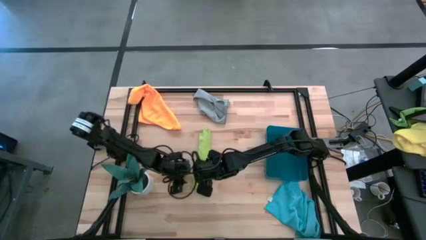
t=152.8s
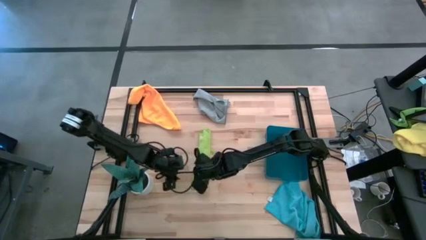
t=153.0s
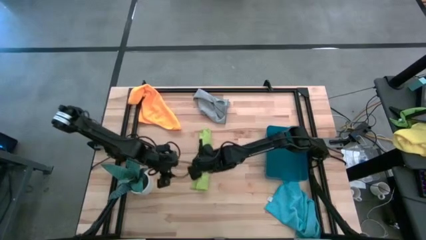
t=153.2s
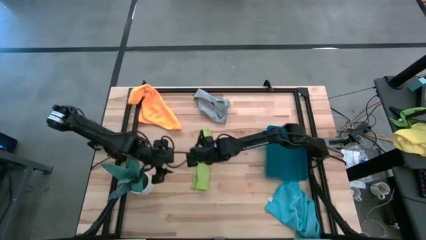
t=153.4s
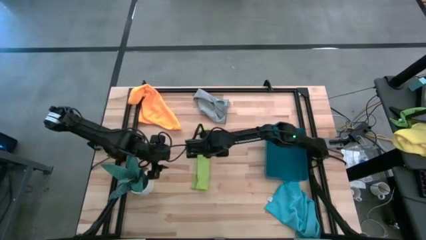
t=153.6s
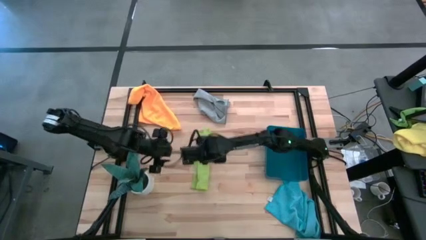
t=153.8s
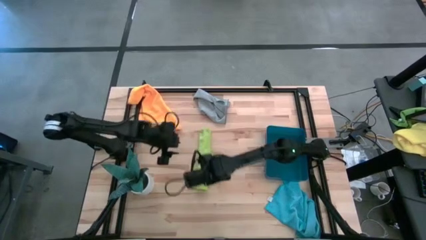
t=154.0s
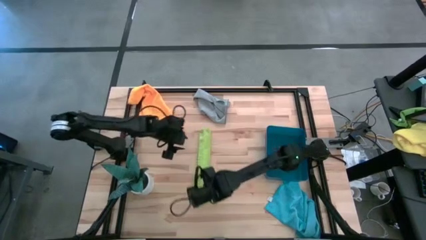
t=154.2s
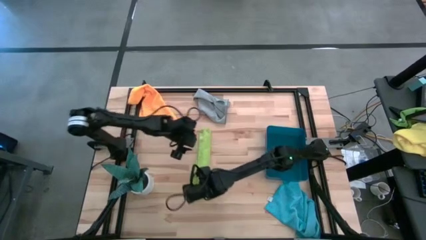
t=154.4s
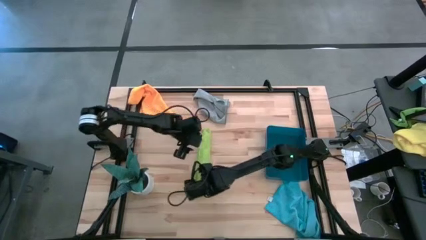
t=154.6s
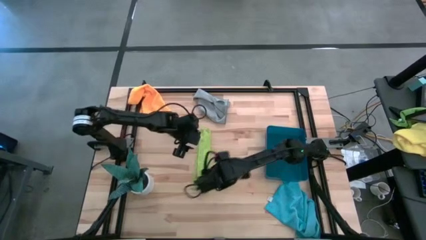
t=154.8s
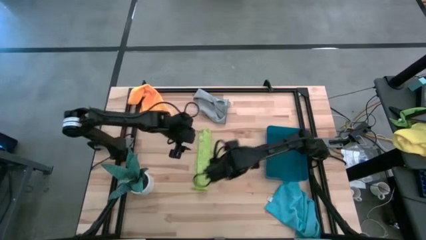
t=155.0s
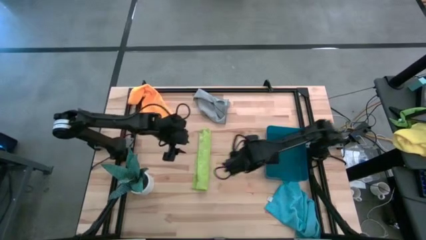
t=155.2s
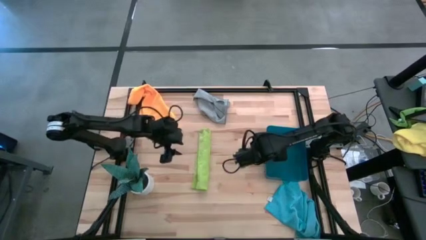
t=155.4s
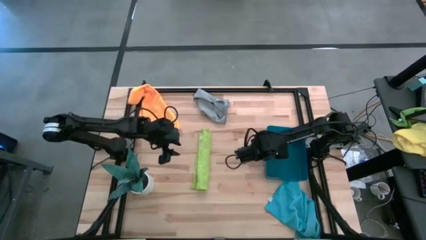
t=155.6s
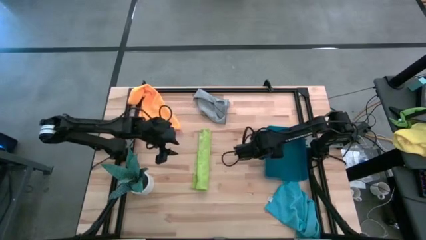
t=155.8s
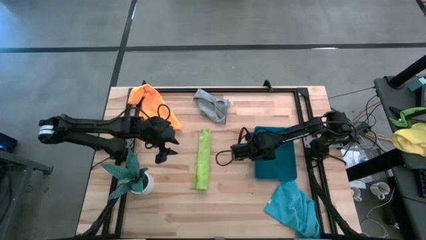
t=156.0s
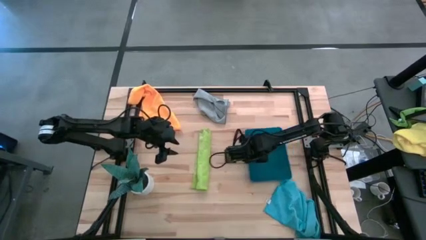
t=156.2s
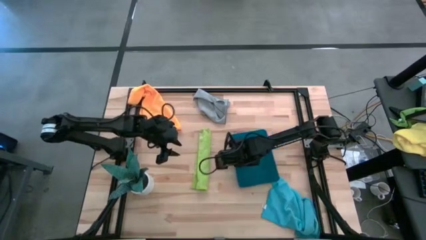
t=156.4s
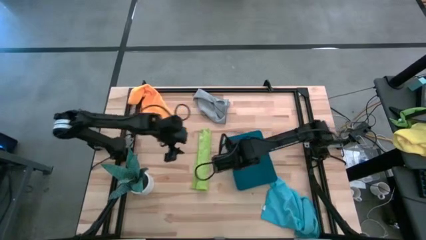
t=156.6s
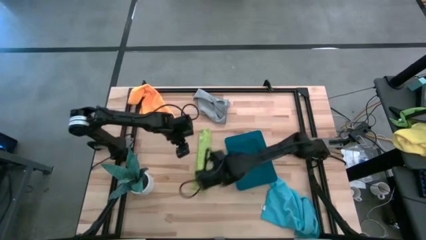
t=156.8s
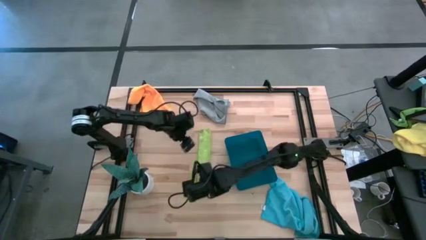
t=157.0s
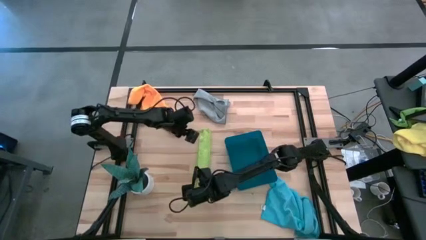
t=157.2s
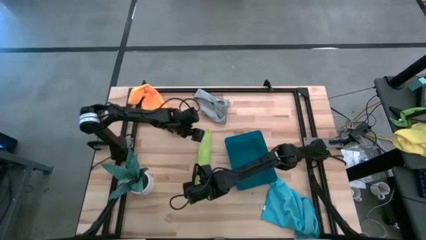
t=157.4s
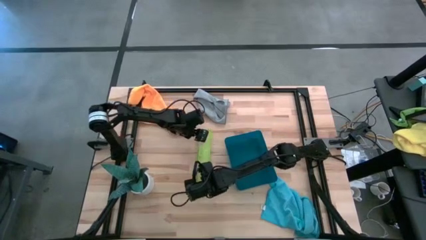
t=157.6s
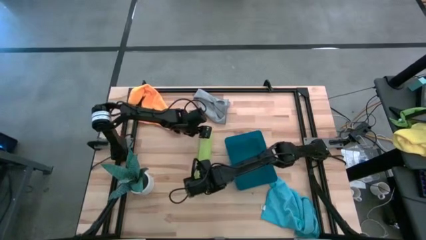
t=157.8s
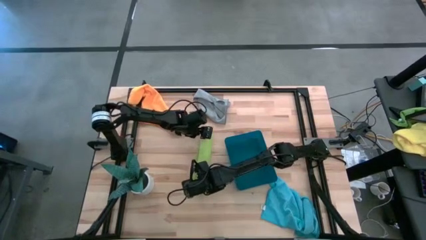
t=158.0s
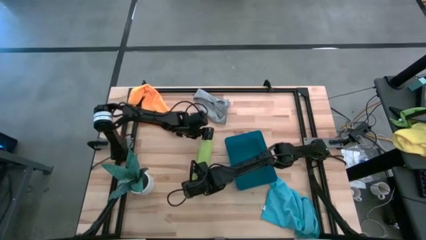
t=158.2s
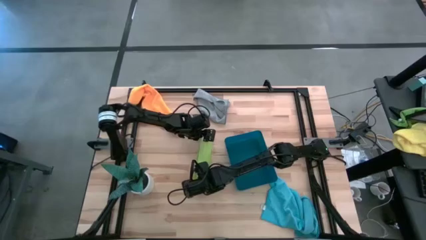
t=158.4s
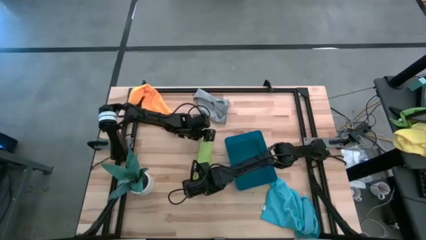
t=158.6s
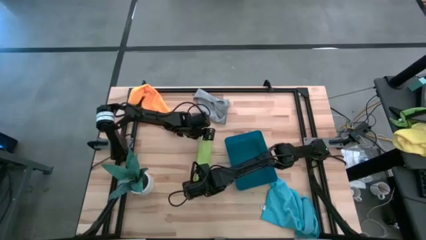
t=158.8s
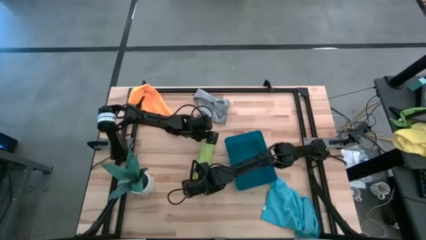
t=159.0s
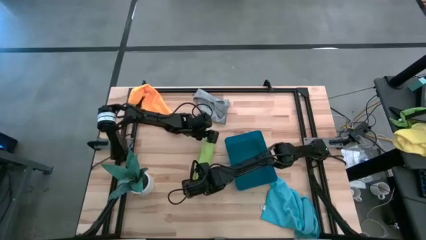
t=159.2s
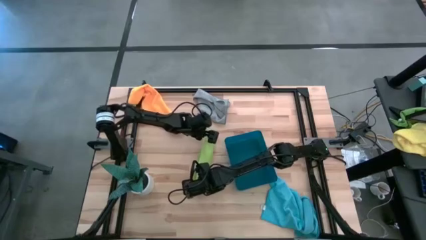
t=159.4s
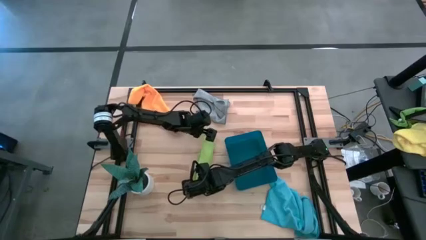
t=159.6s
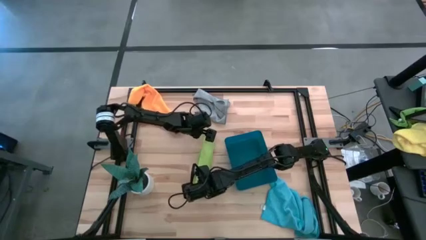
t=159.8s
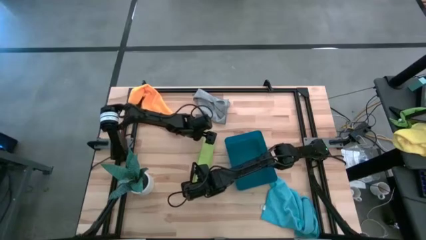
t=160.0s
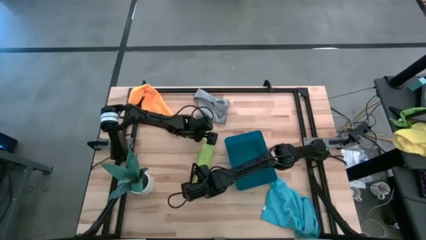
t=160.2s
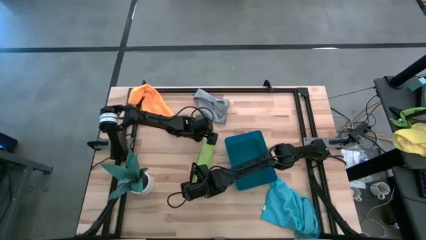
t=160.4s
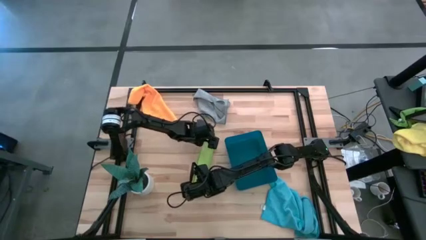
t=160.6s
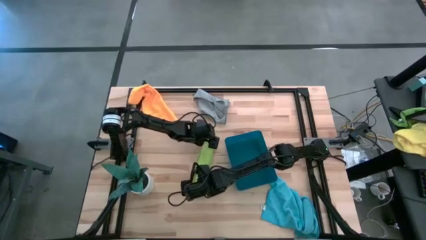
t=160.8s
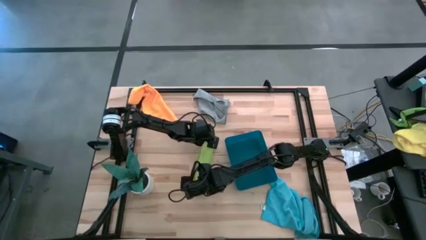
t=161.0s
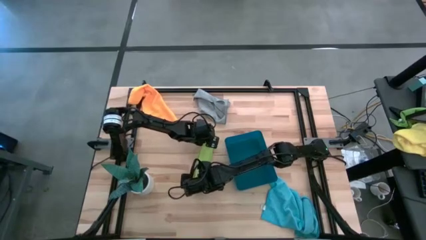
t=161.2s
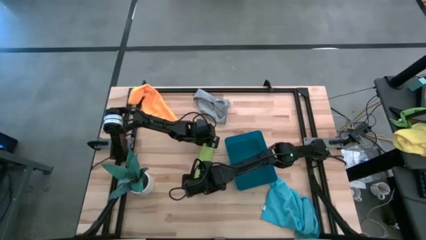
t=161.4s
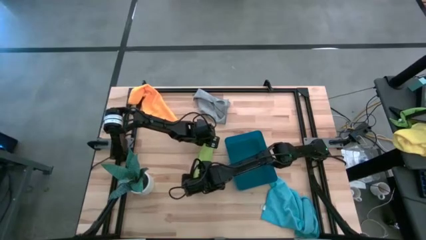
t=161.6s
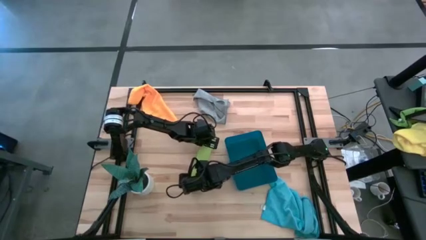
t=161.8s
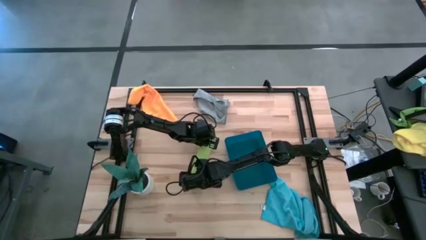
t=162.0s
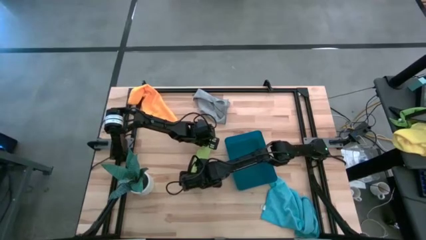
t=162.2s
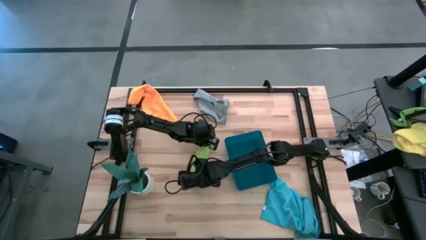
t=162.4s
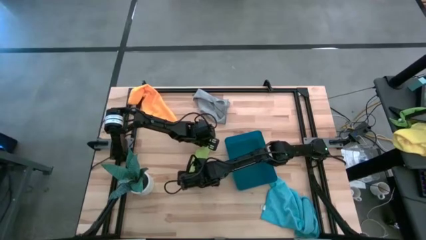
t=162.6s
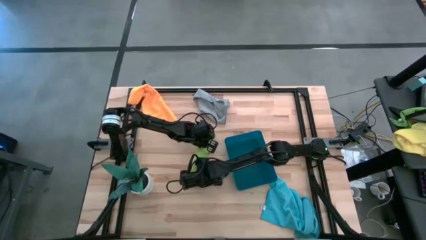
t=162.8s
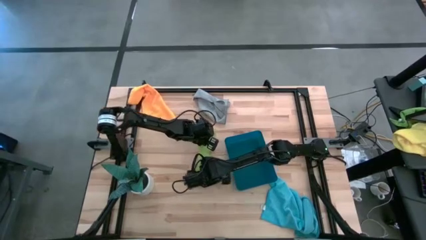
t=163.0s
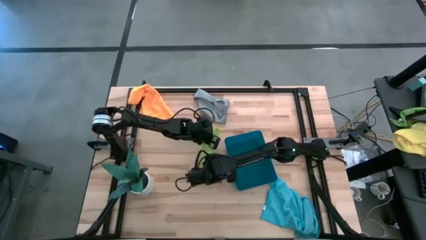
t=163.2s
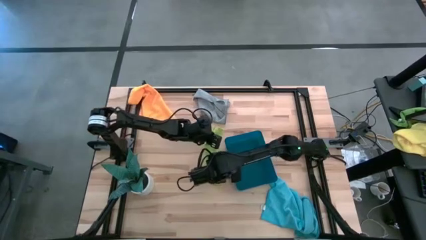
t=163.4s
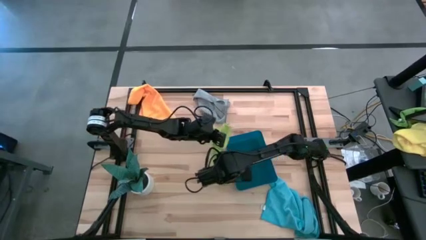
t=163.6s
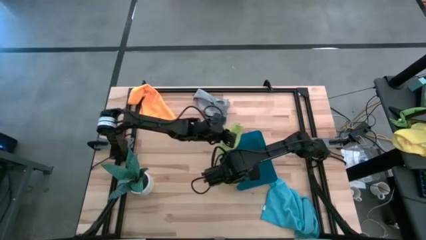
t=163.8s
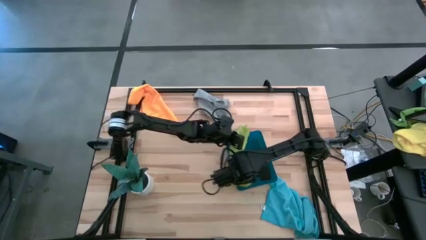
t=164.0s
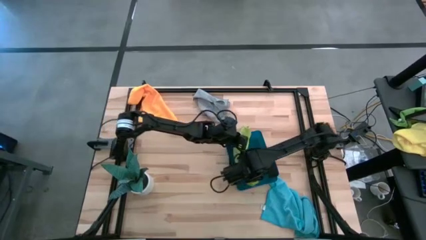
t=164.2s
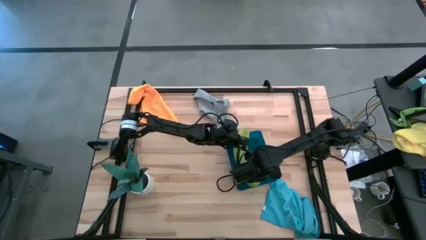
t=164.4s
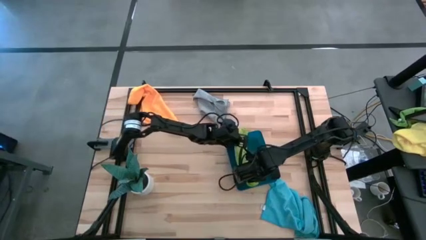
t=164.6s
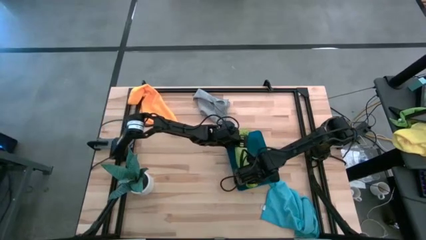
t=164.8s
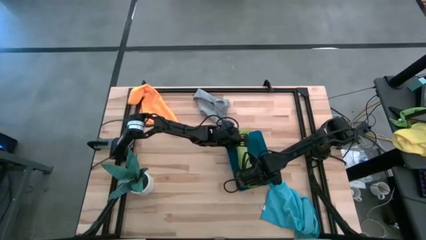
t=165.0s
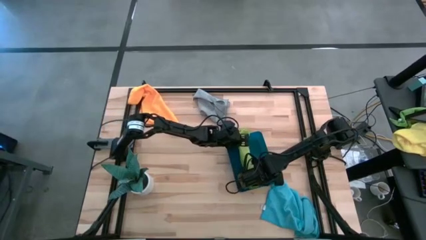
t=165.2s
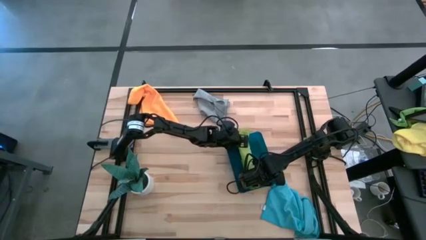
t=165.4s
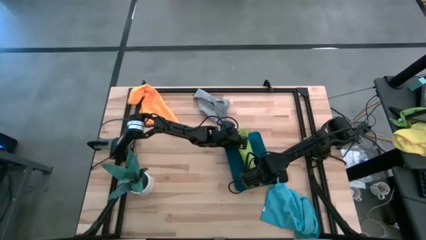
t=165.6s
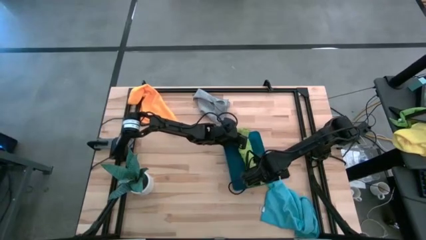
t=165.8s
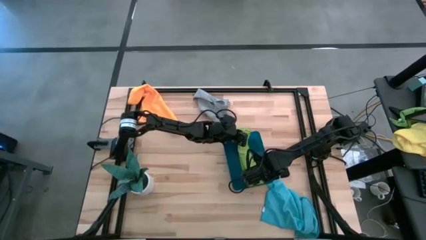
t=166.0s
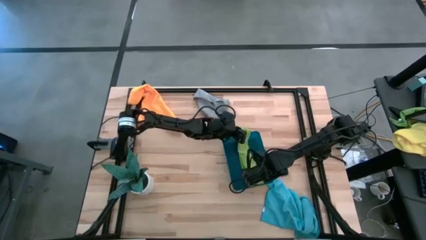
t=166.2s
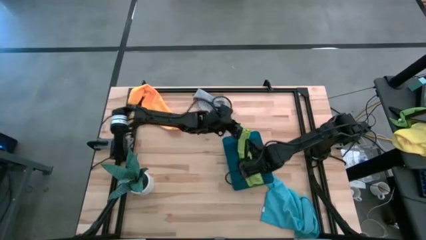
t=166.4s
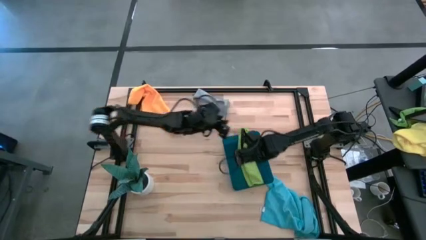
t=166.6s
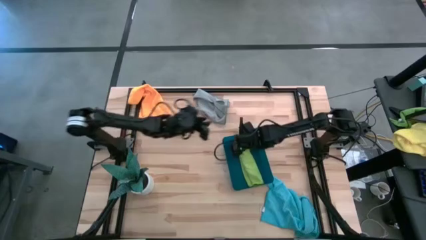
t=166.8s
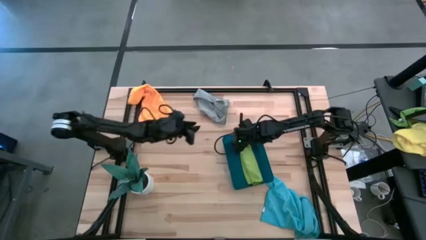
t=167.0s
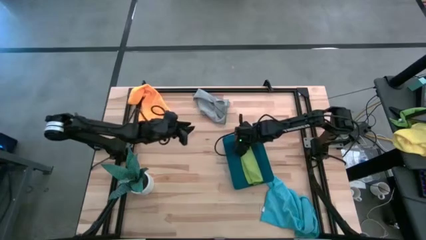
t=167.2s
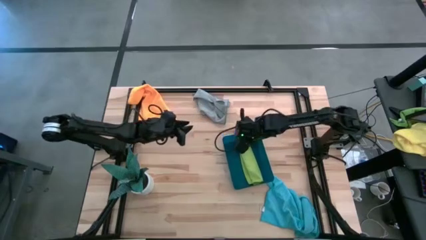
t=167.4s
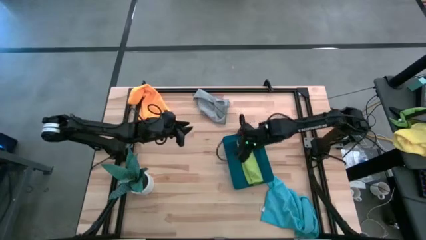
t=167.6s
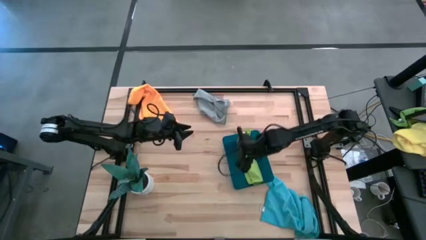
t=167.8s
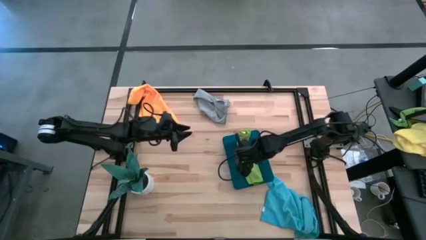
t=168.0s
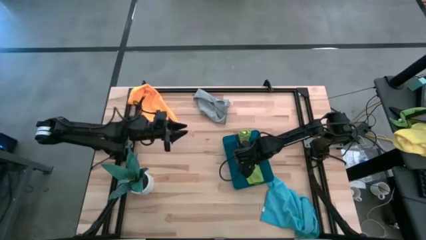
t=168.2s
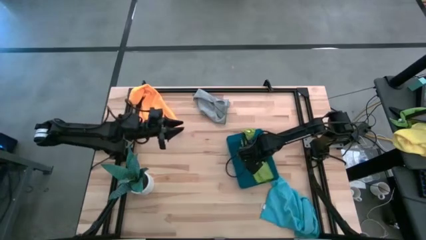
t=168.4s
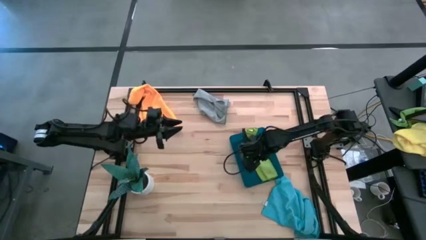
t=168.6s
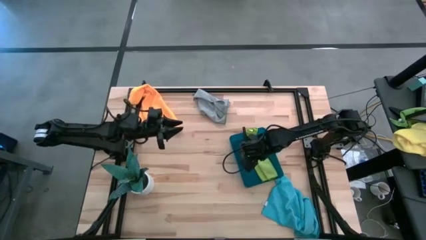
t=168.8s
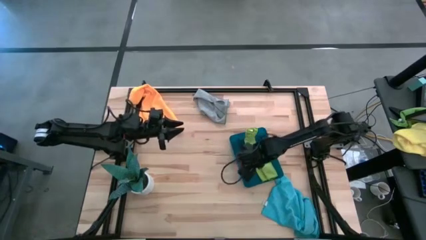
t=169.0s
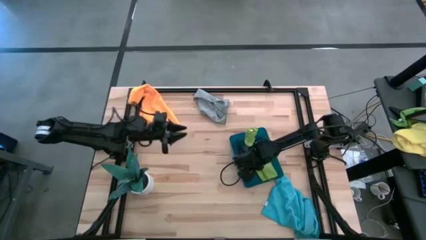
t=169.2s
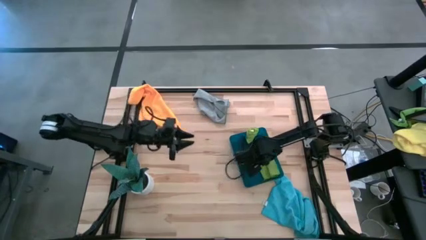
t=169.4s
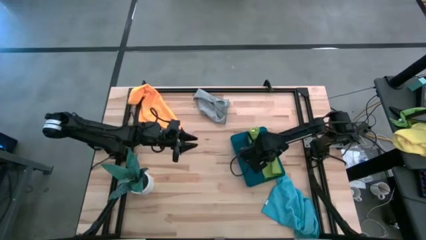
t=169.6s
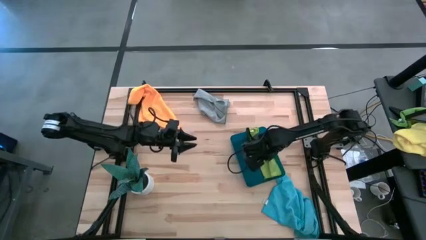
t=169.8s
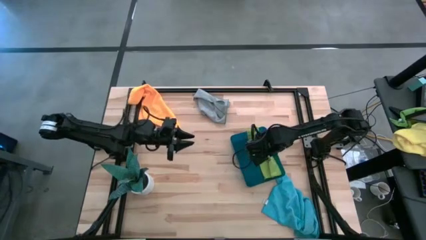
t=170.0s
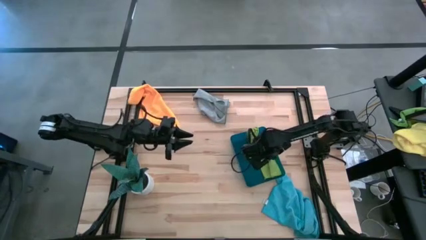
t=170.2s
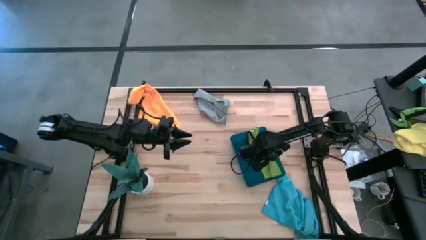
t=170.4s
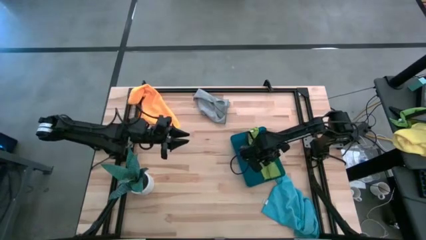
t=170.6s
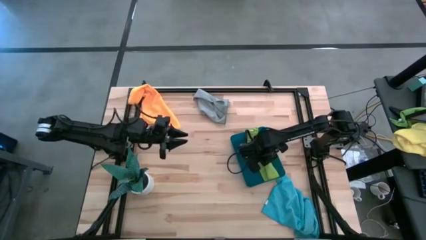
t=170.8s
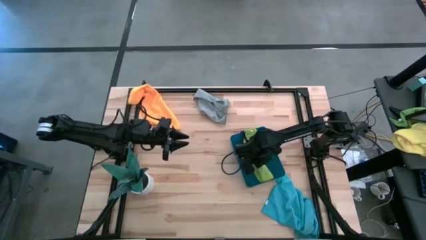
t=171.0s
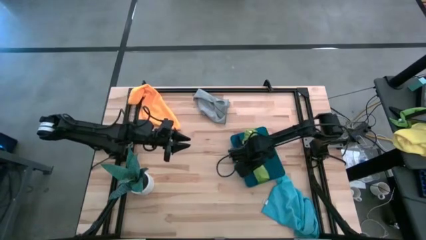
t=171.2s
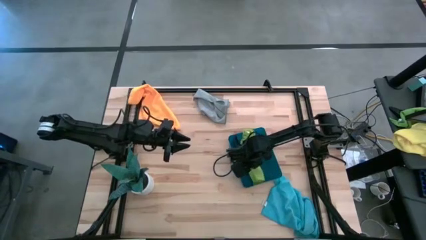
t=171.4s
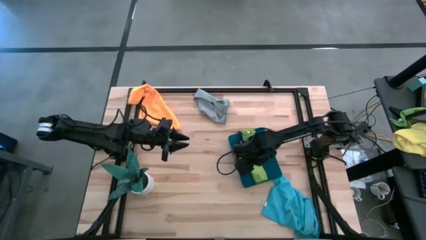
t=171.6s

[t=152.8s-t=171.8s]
Task: Roll microfiber towels into tight, uniform cylinder then place into a basket
Put the green towel into the blue bin
